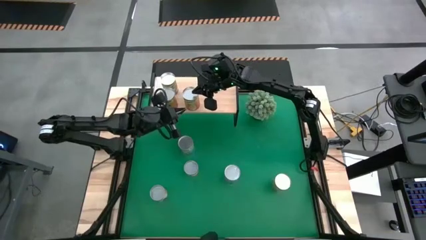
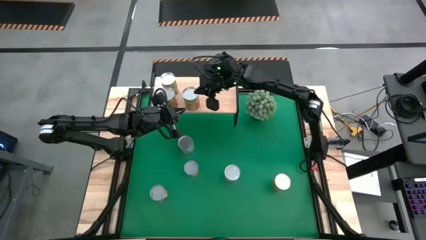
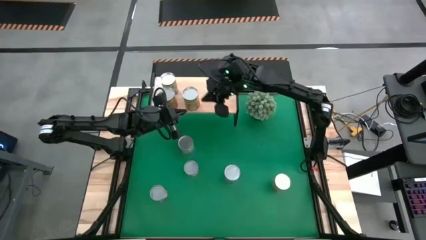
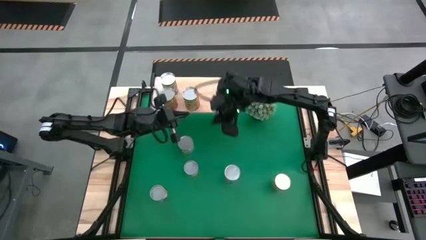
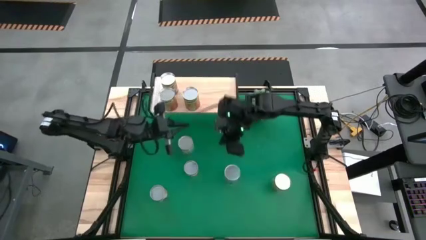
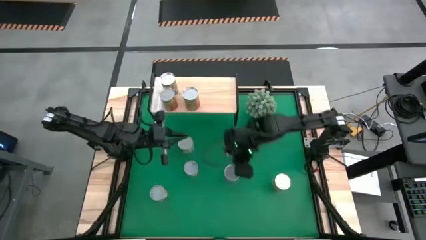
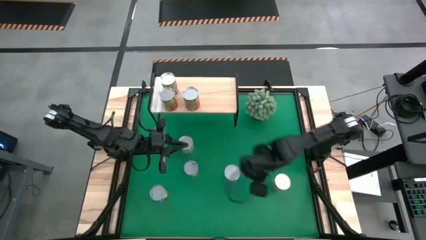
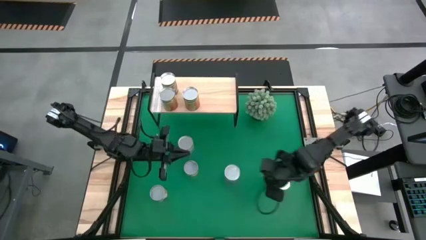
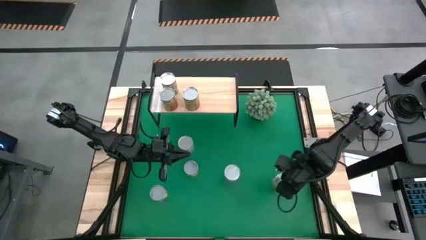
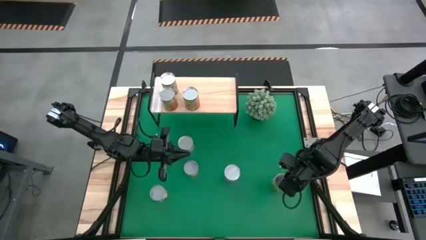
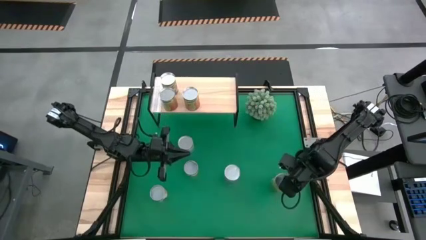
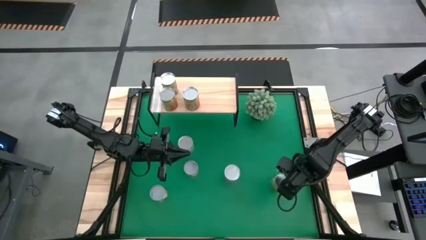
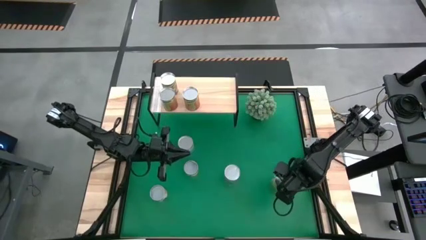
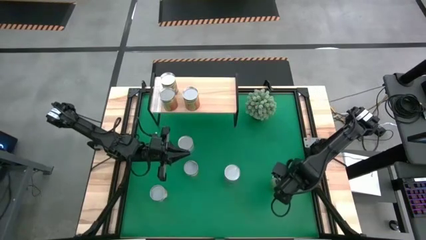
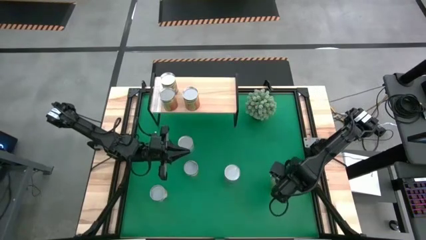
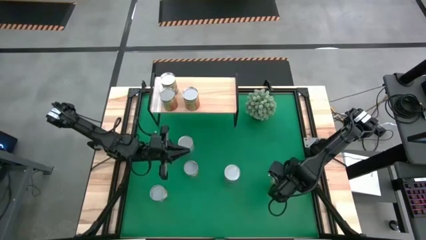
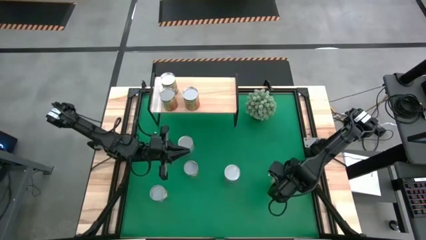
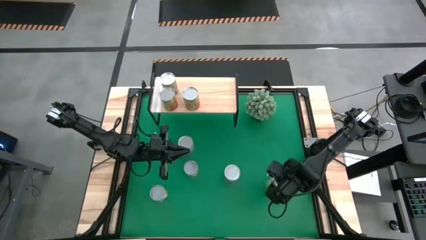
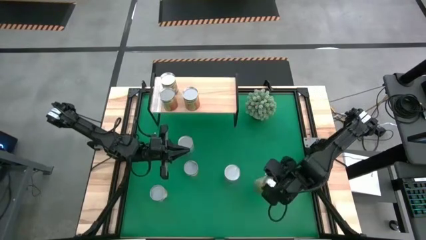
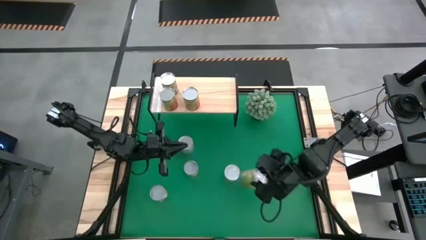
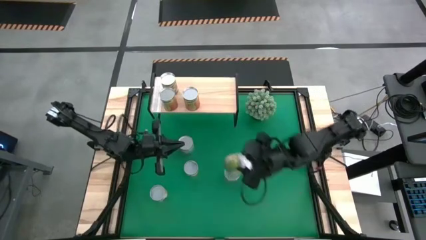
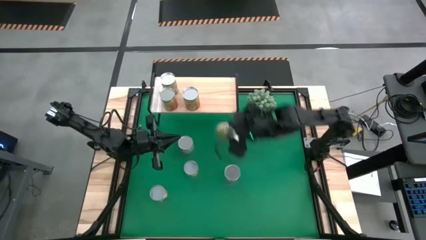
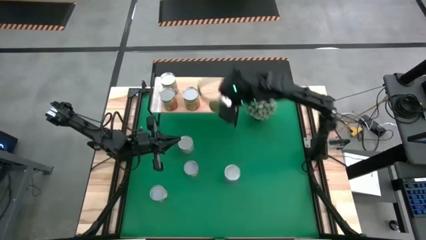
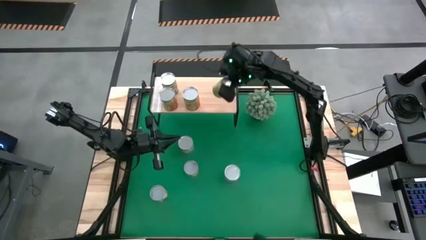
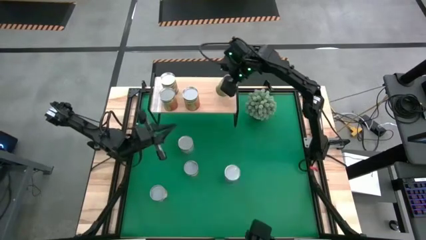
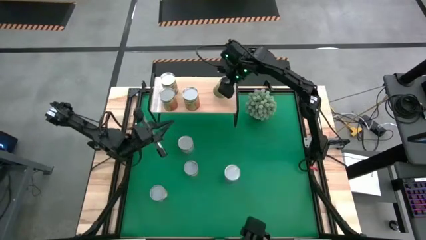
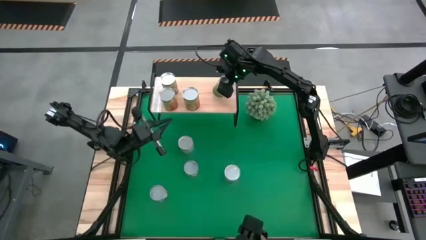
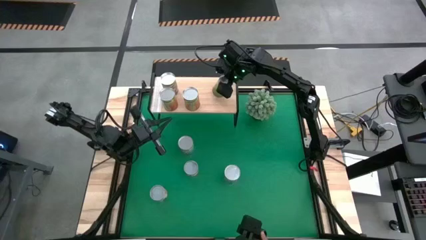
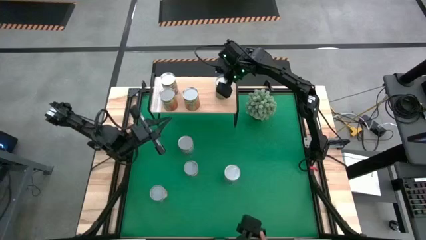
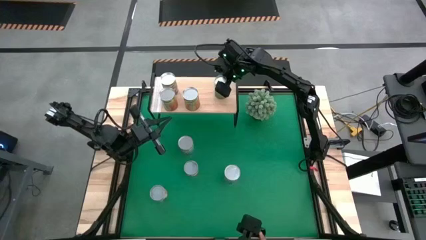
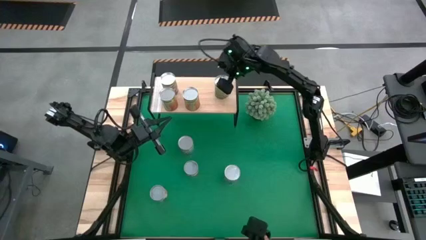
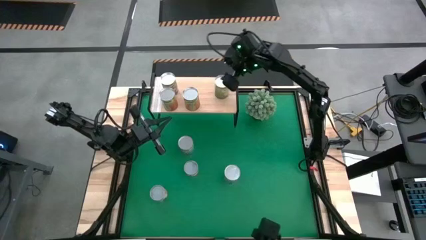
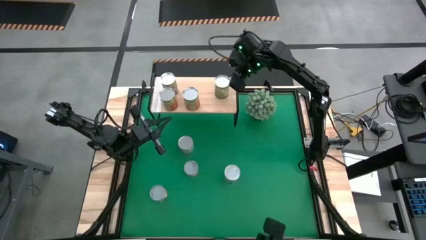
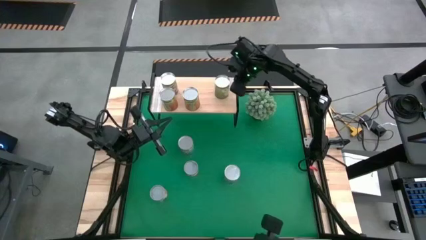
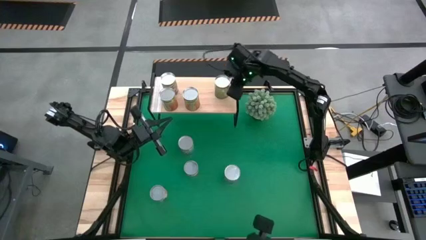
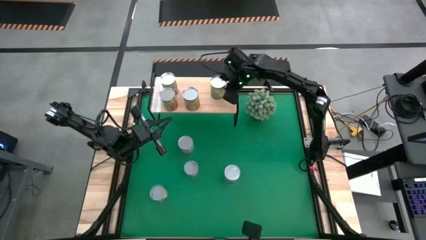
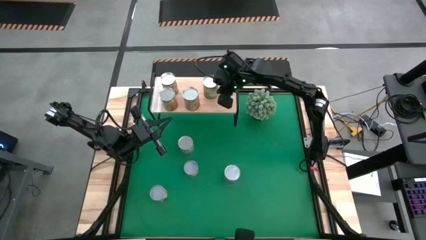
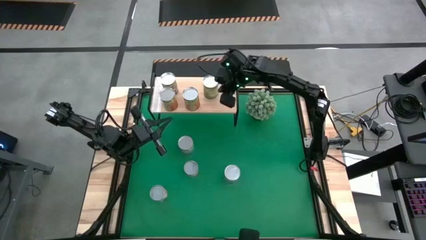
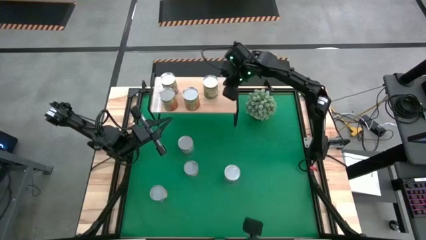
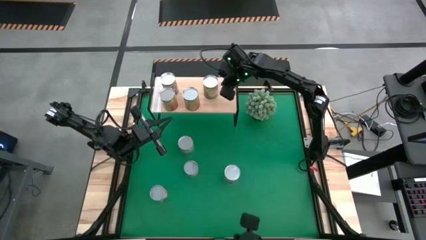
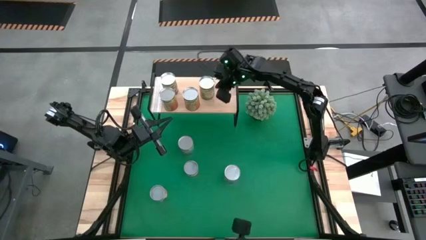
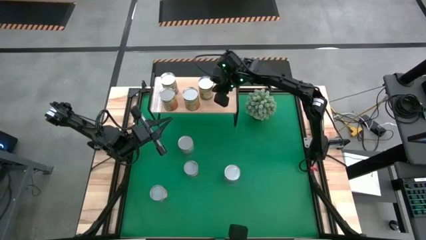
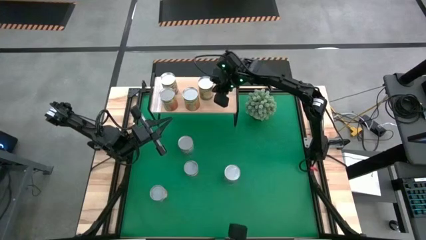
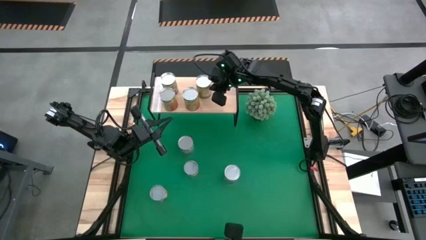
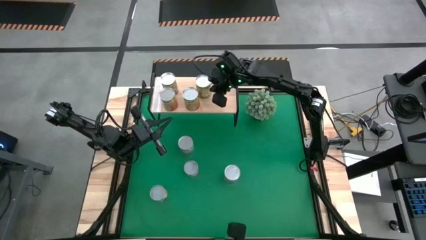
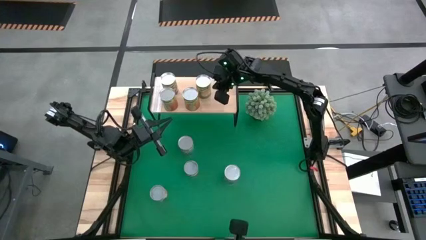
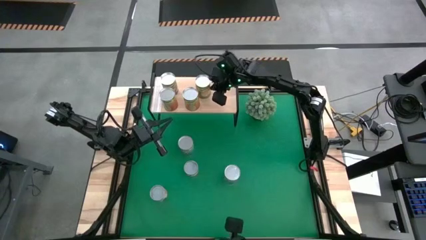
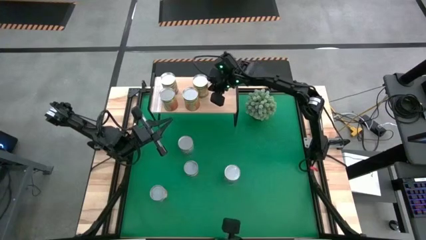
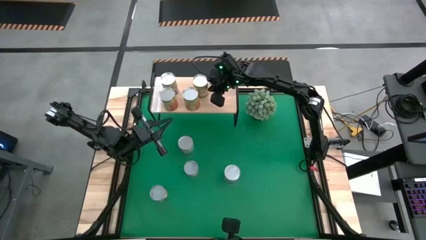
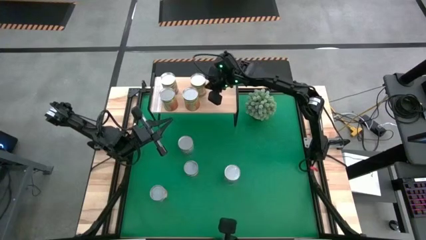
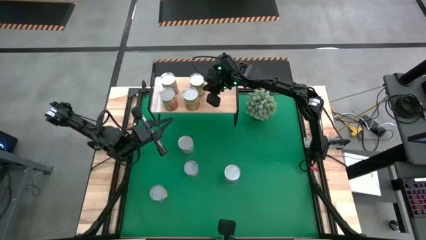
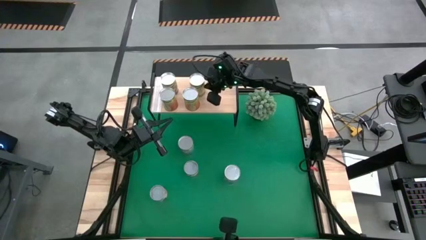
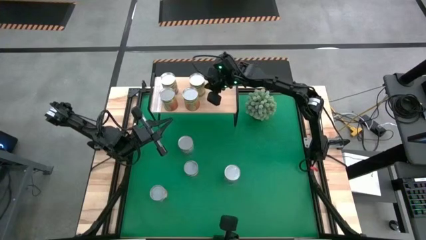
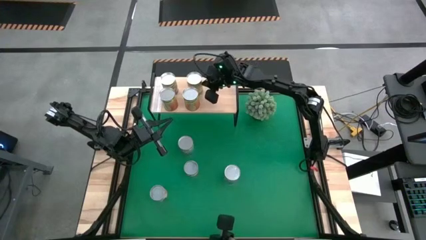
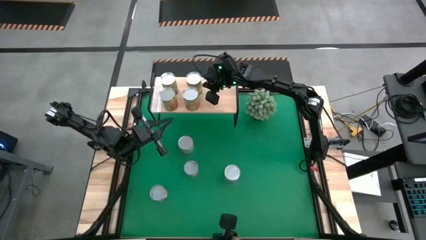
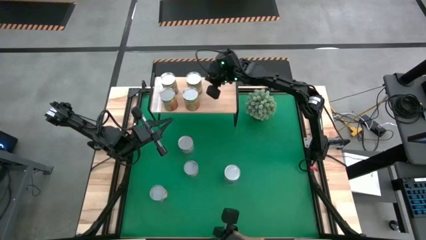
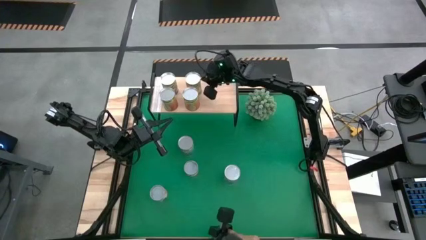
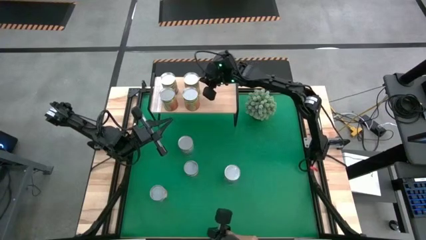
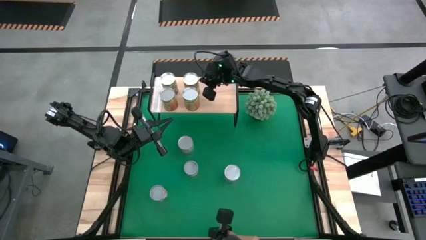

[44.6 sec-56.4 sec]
Task: Pick and place cans onto a shelf
Put the canned oranges on the shelf

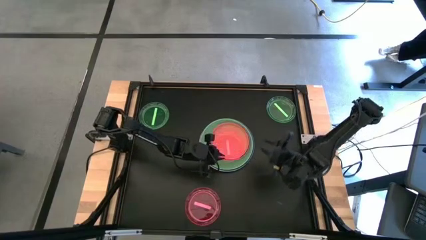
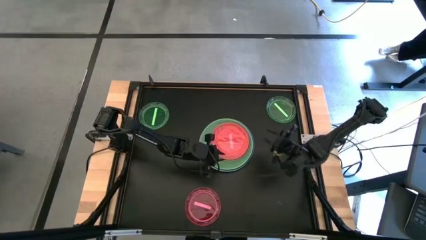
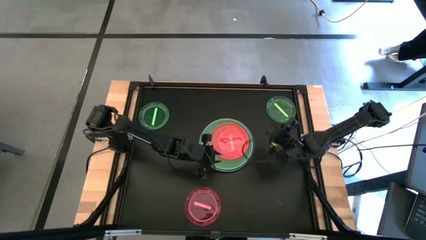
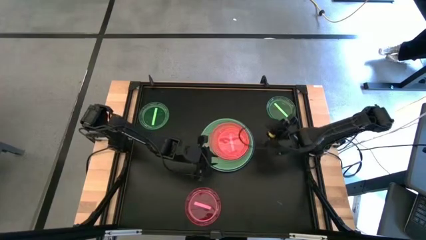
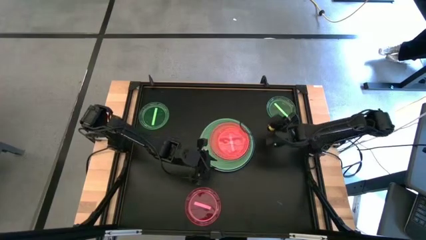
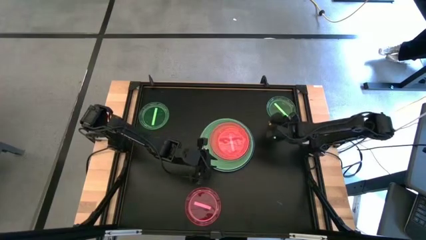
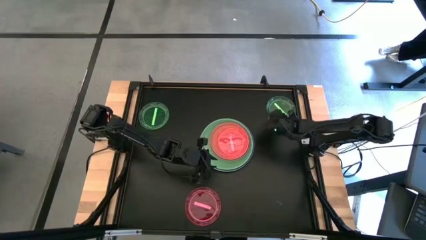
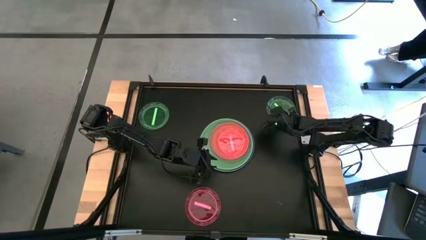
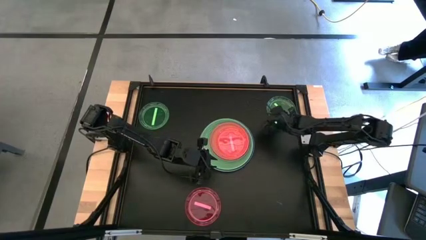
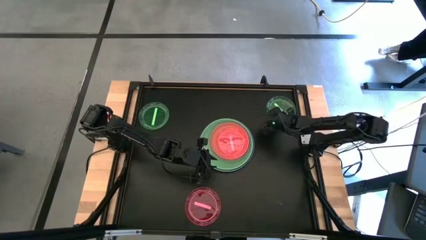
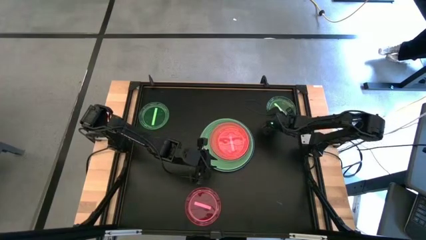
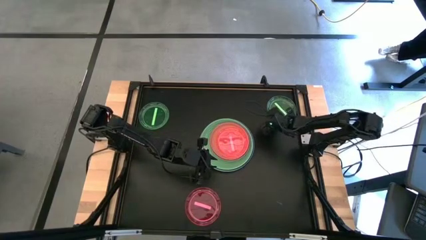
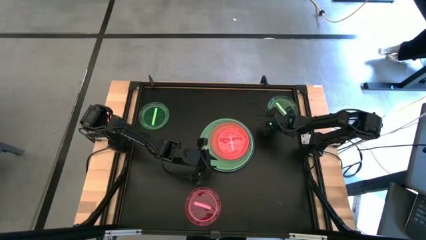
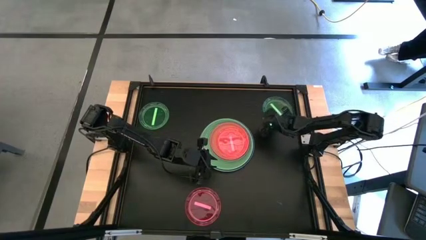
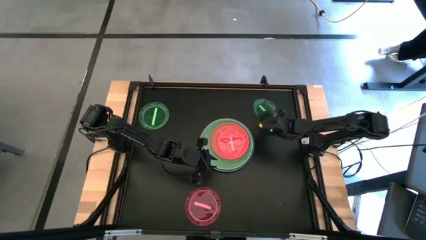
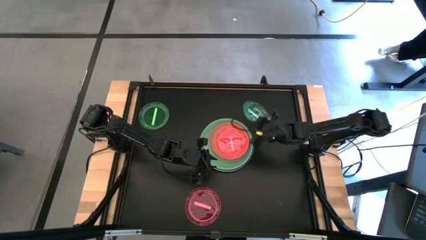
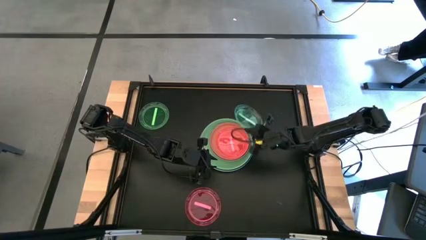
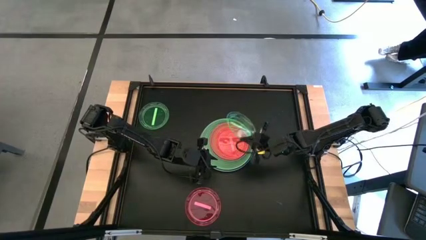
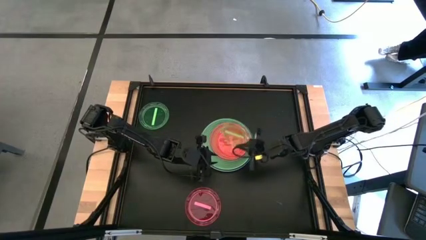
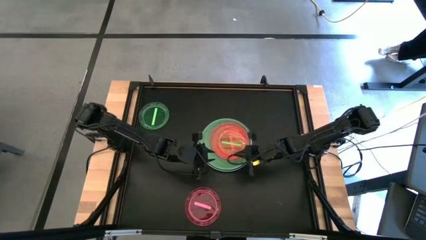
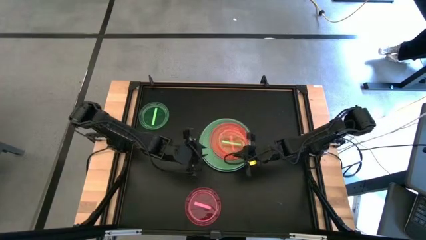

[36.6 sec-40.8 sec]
Task: Stack plastic plates
Stack the small green plate on the small red plate
